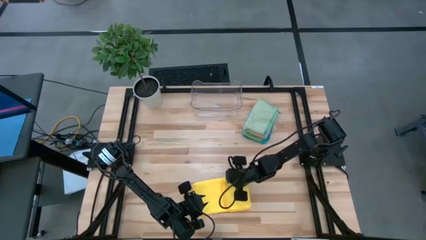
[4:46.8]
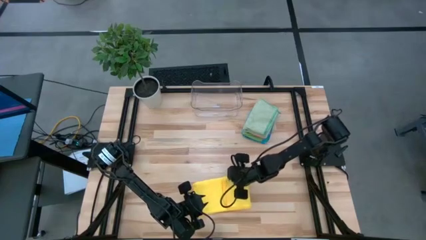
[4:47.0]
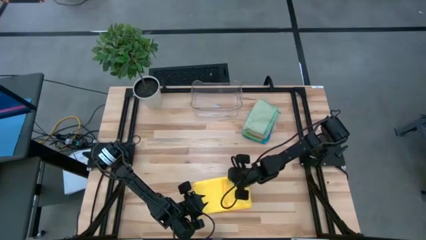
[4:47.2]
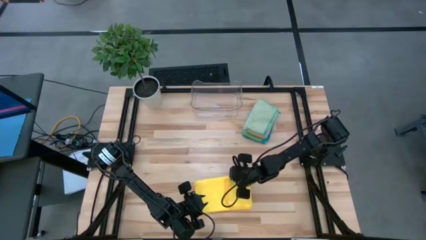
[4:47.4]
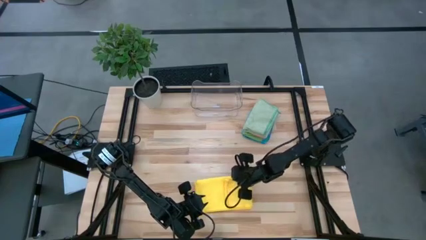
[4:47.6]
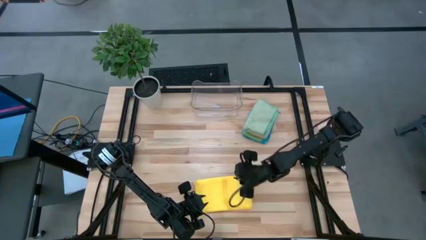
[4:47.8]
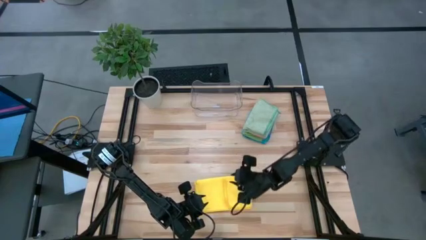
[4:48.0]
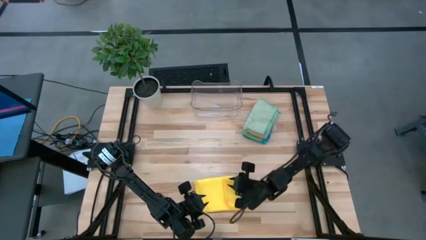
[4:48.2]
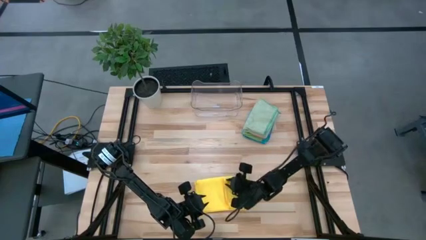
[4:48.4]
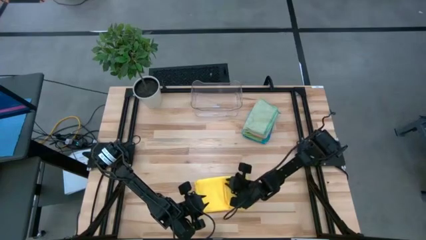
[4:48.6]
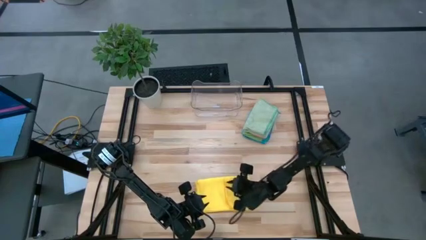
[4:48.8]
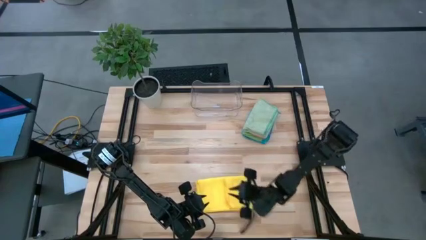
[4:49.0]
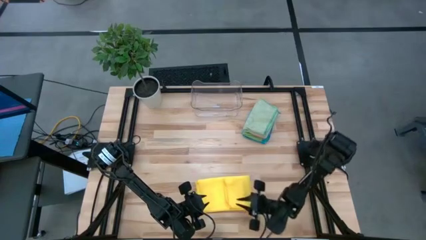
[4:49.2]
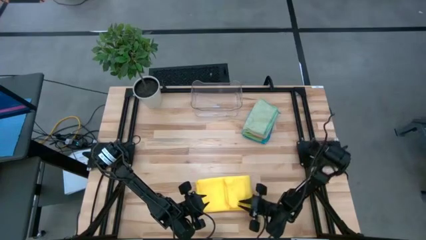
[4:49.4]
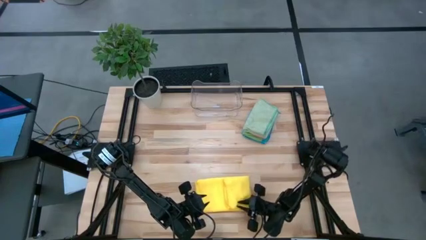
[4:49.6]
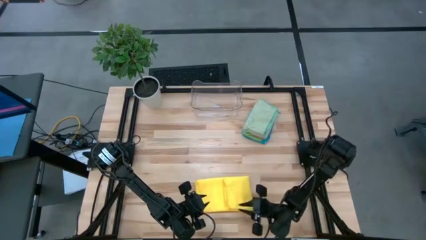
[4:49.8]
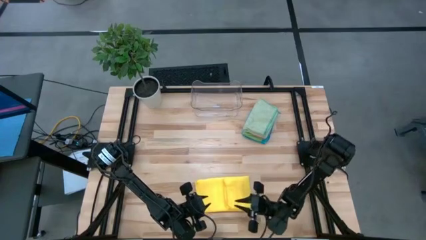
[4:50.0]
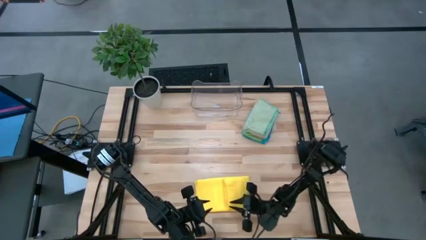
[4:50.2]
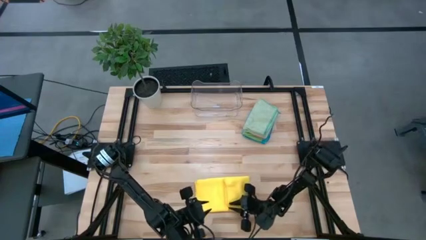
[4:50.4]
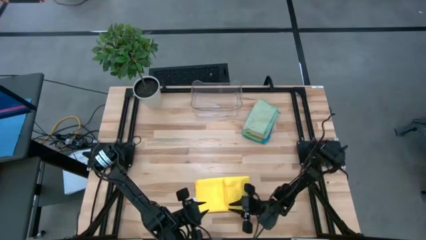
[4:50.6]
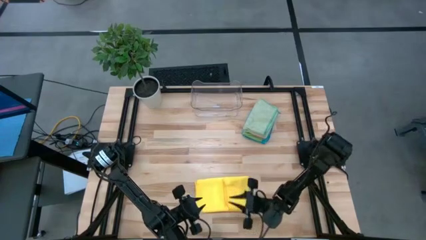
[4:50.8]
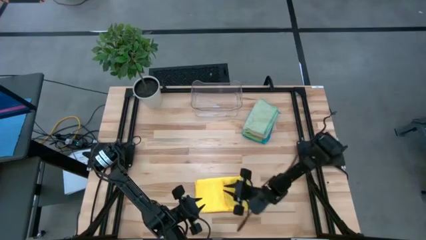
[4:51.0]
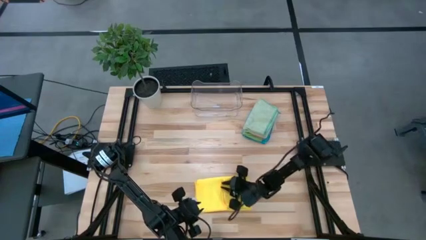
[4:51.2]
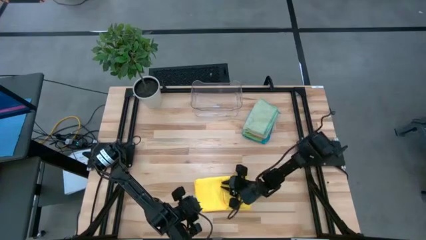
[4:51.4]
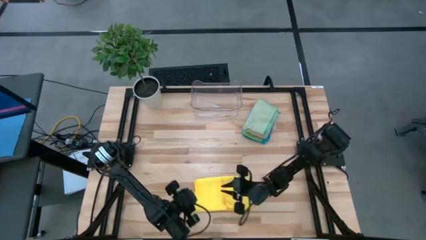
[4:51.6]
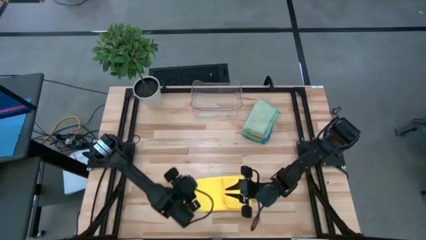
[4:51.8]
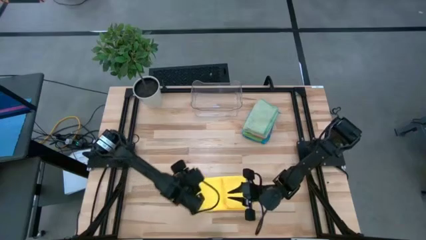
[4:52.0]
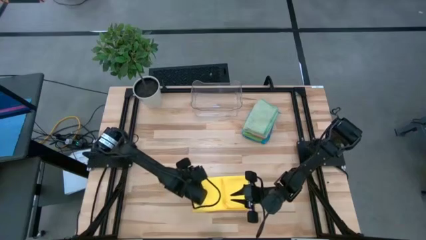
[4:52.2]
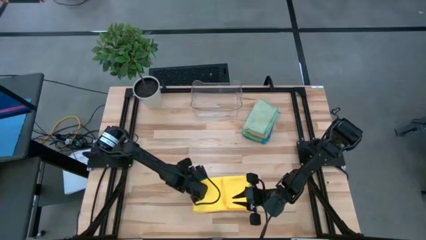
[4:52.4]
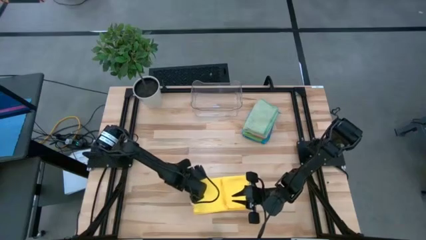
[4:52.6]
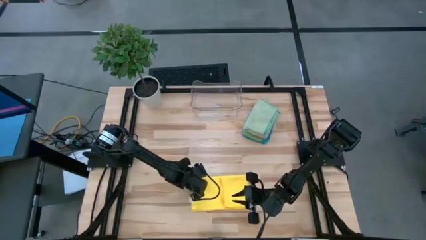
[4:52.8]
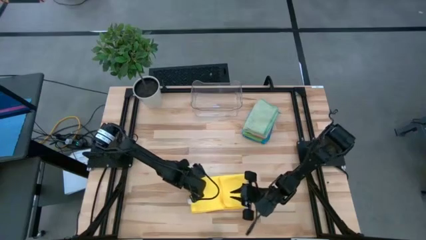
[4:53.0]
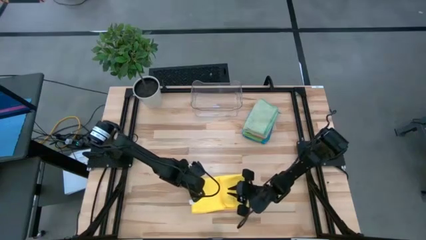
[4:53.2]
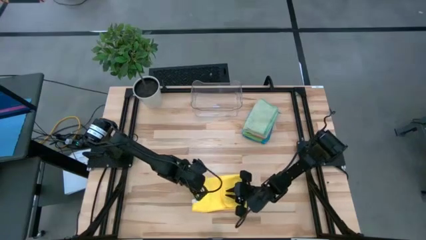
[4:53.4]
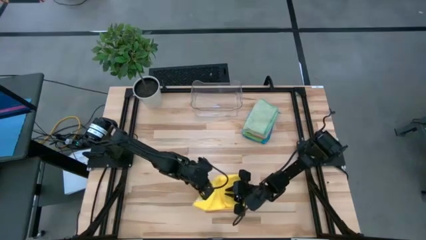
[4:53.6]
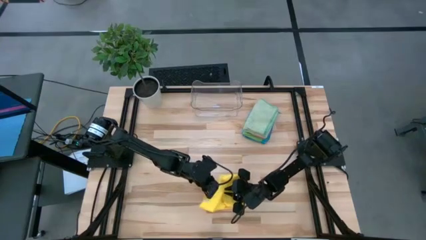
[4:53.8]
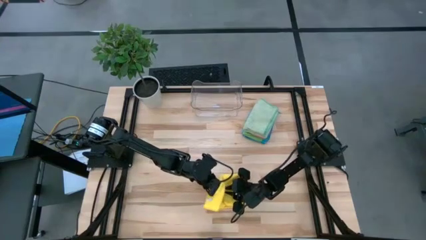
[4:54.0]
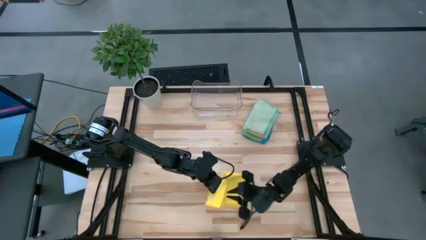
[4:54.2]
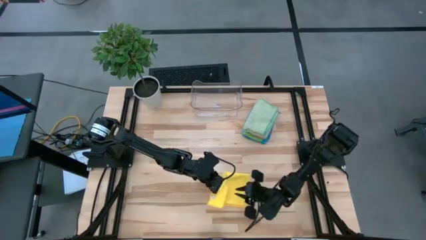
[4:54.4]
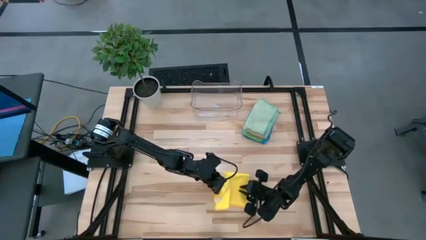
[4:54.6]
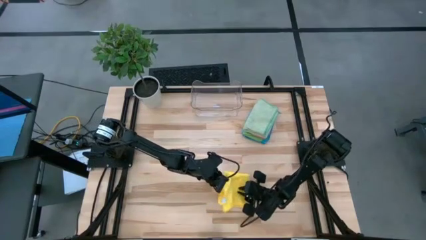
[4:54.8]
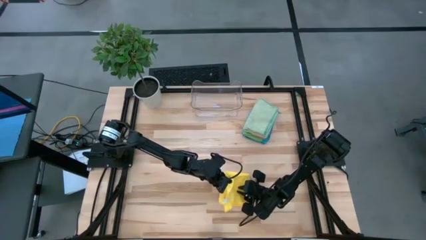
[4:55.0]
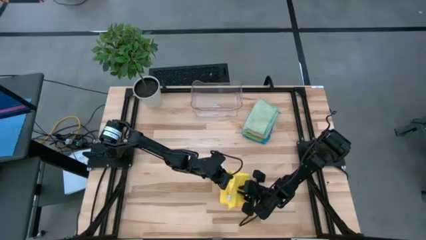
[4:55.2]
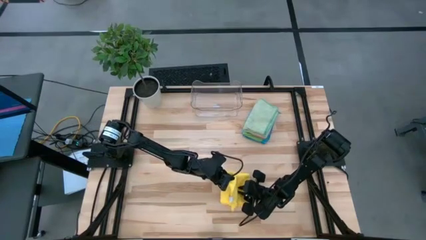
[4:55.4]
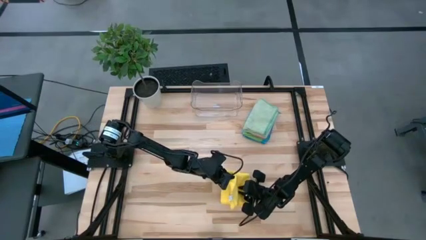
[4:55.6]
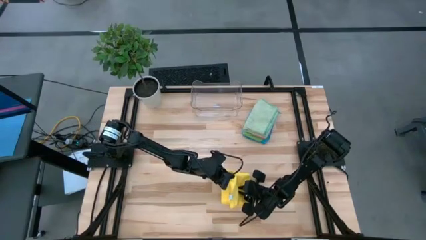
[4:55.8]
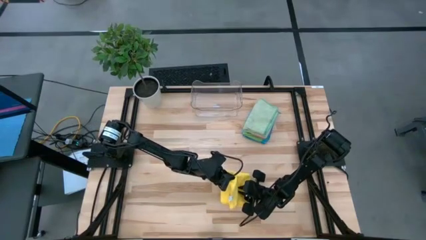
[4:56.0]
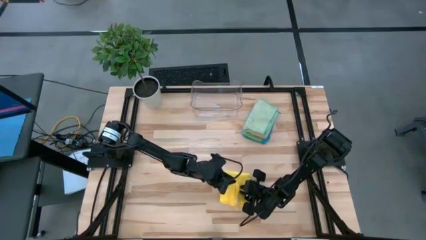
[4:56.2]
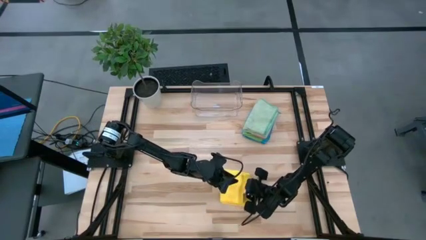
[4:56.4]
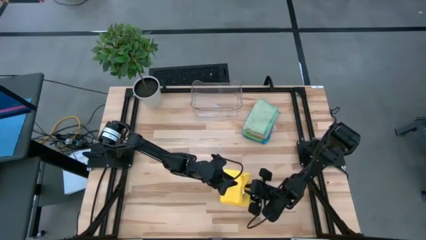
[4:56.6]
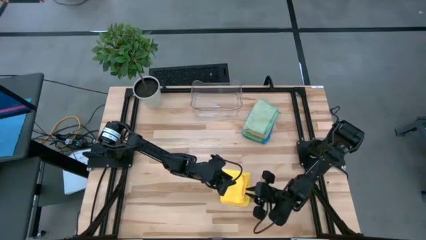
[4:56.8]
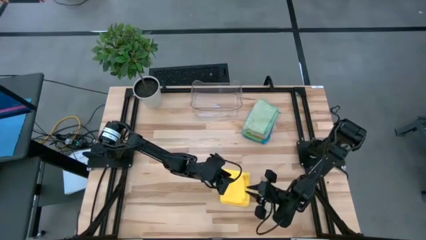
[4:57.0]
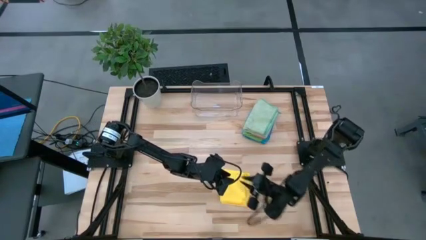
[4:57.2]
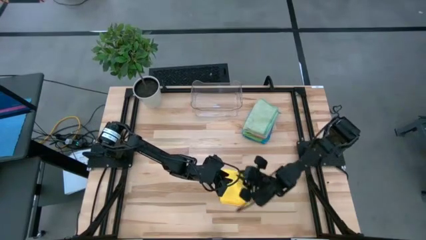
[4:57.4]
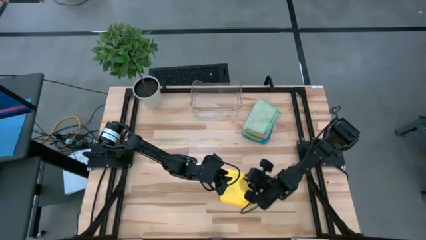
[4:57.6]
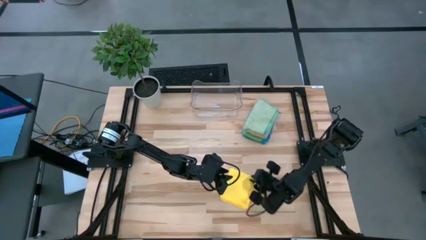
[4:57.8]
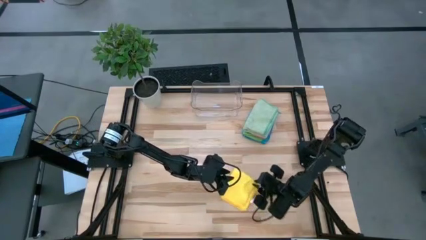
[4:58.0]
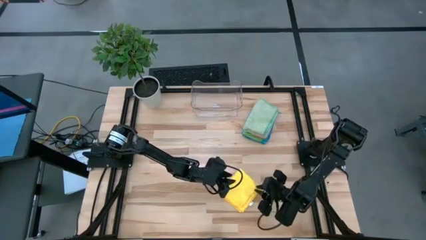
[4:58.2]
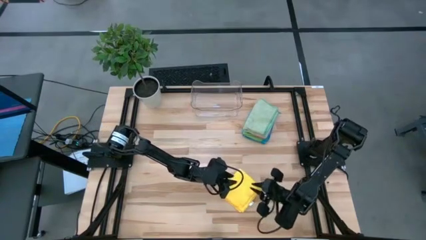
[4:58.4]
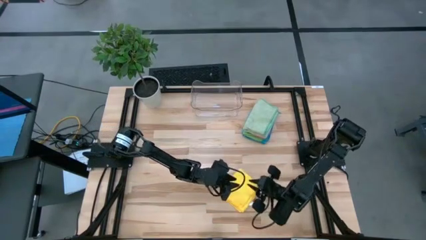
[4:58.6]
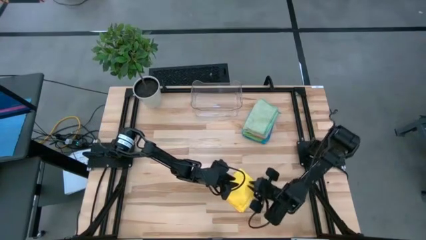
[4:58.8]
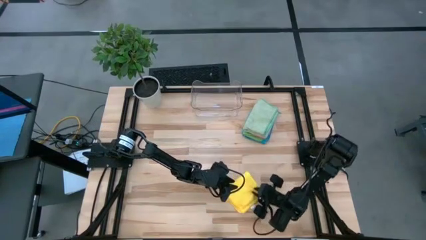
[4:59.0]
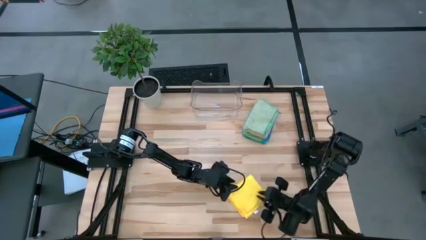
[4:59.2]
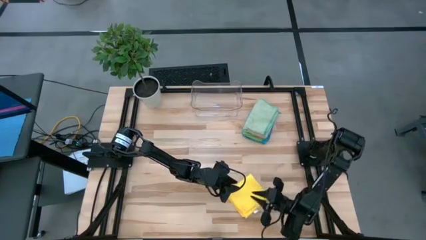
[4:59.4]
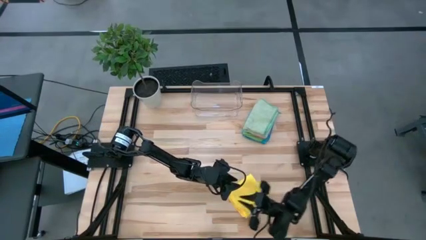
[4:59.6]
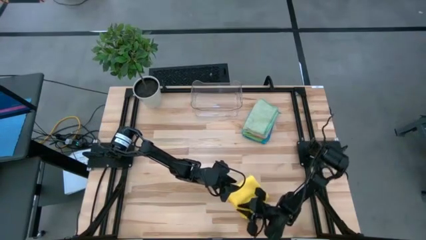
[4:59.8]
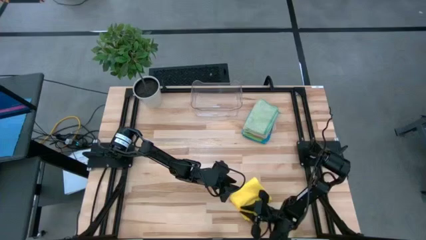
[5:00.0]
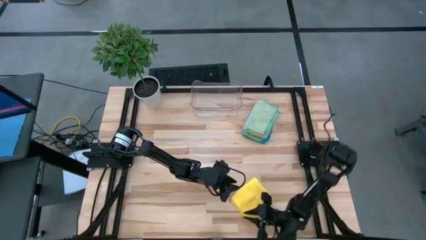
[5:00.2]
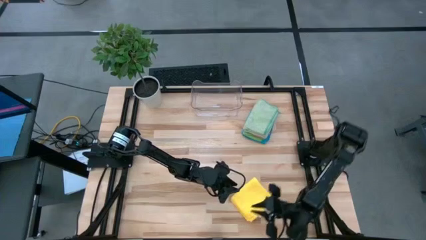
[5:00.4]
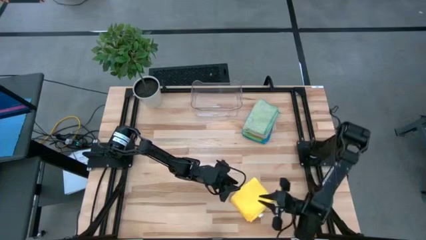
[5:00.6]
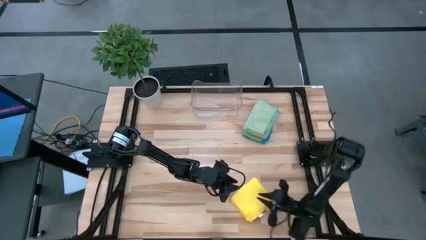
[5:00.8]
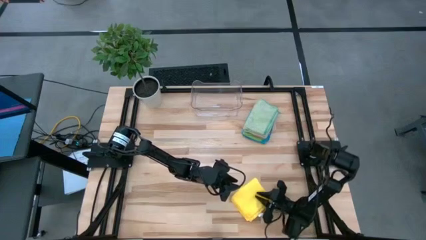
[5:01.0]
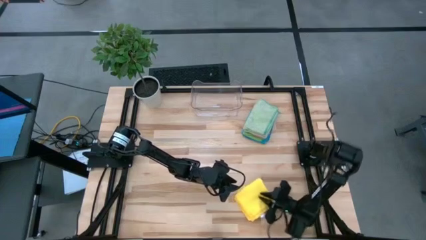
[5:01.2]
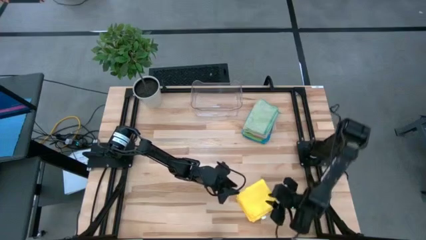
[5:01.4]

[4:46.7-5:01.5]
Task: Fold microfiber towels
Fold the yellow microfiber towel

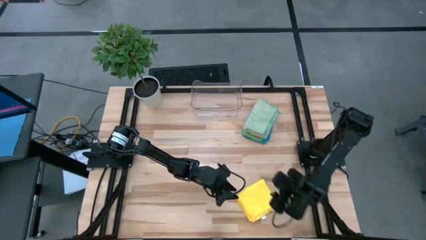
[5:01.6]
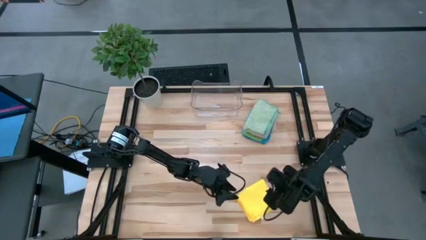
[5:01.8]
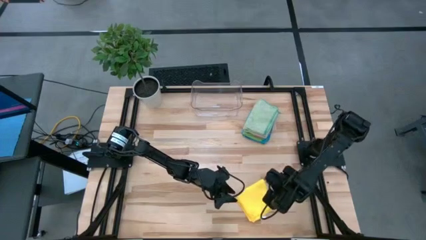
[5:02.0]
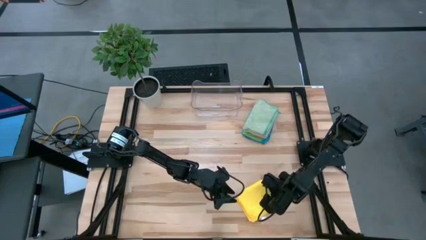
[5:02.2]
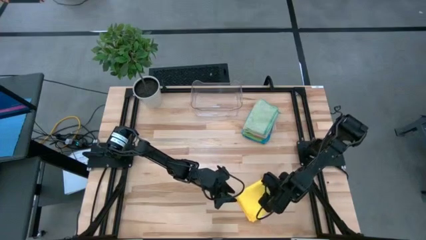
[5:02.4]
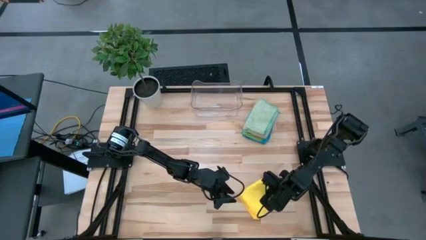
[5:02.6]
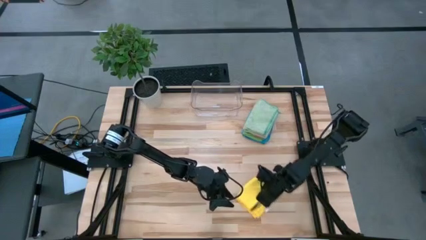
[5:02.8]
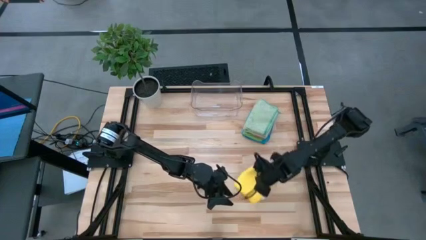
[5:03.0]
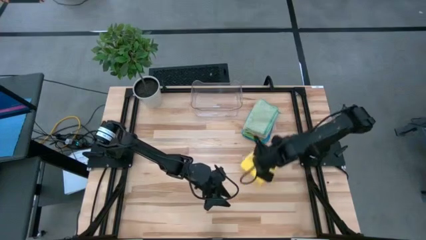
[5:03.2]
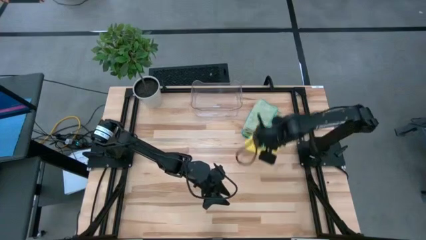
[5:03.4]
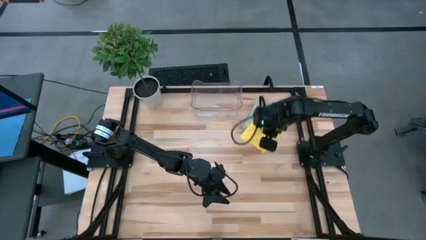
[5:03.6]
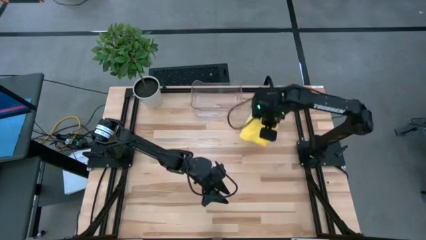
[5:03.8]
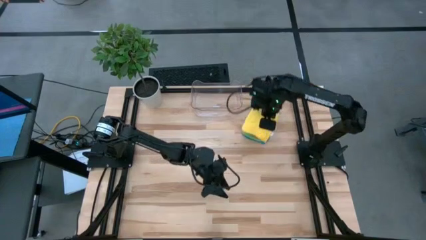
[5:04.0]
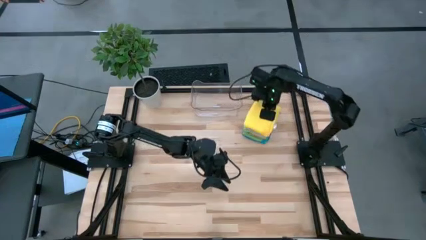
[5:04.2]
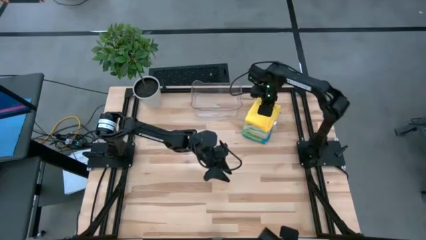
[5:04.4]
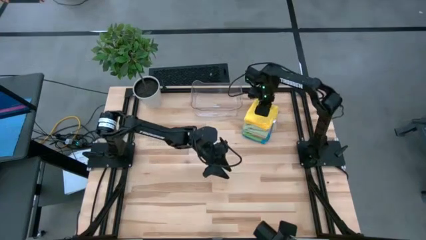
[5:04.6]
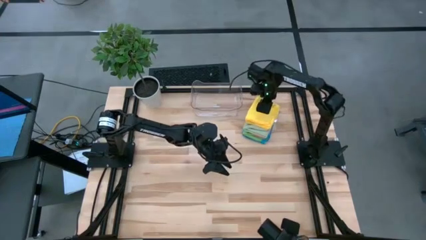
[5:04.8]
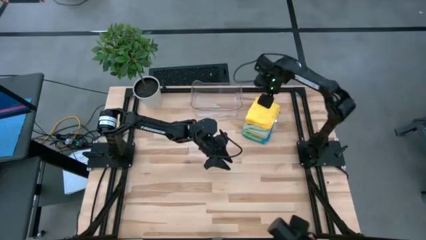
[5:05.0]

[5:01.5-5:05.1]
Stack the yellow microfiber towel on top of the light green microfiber towel
